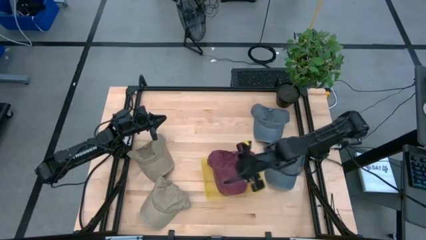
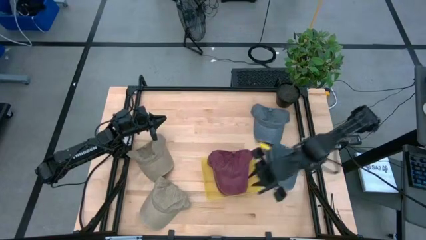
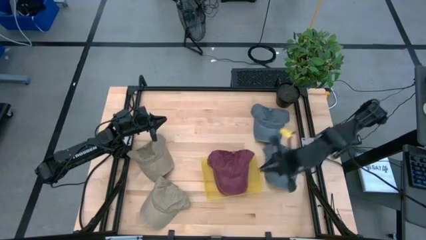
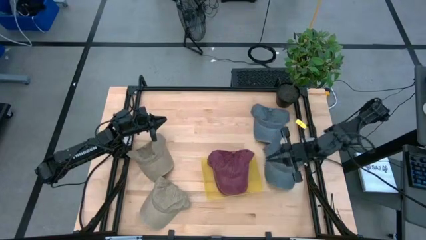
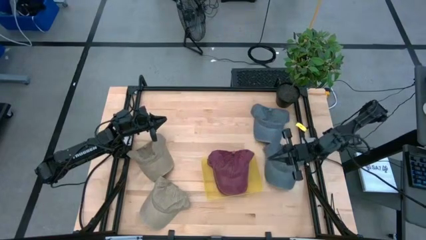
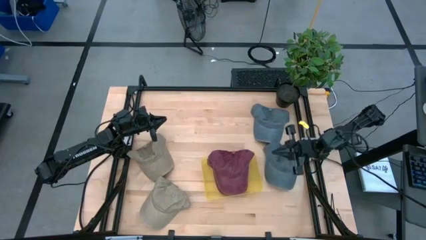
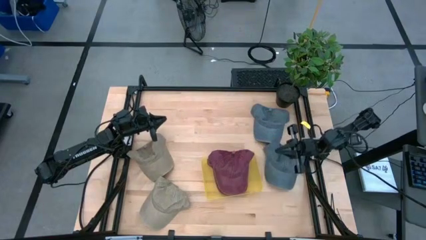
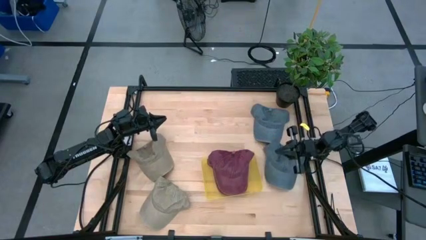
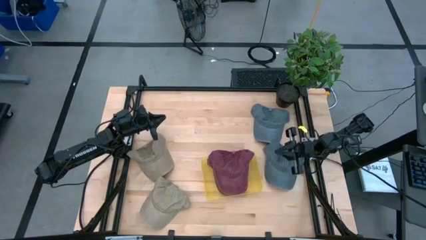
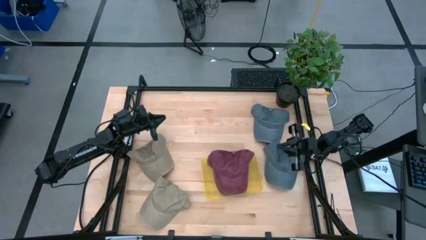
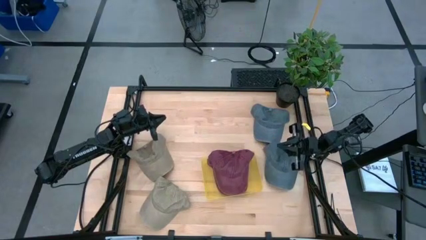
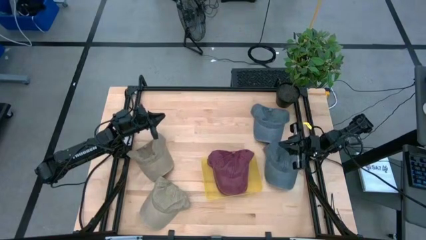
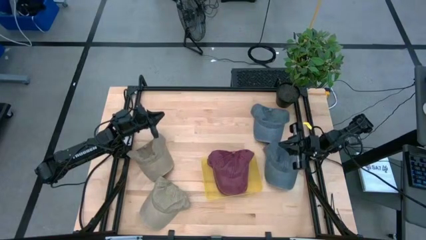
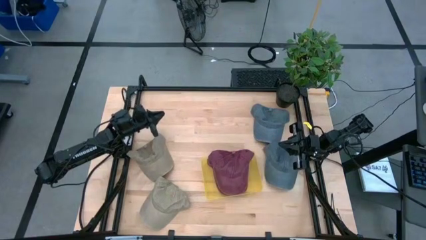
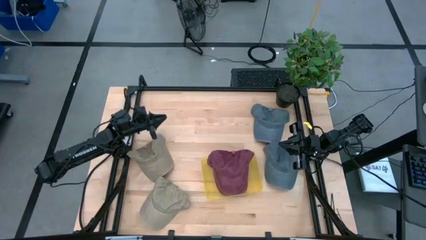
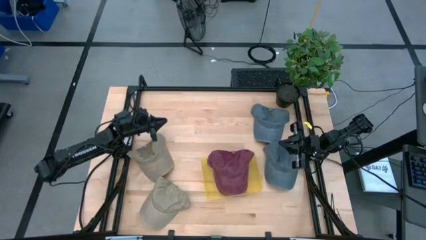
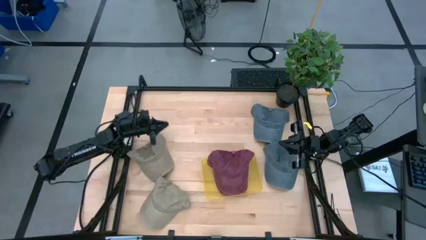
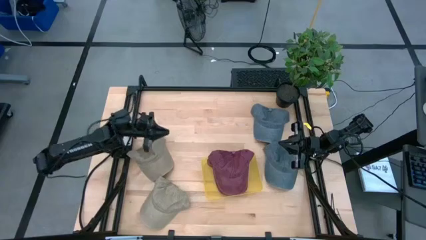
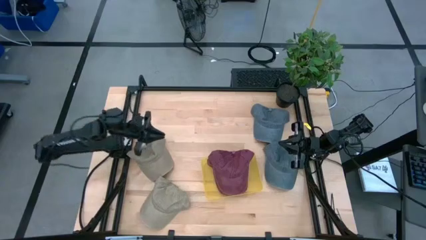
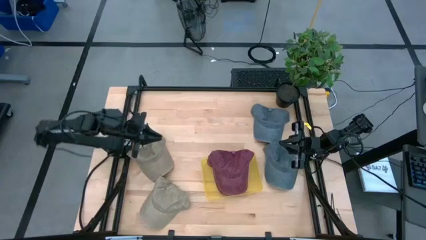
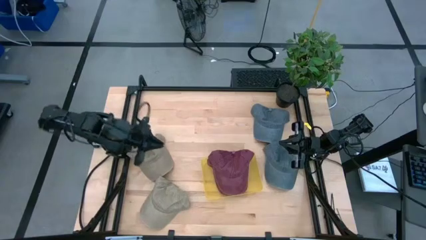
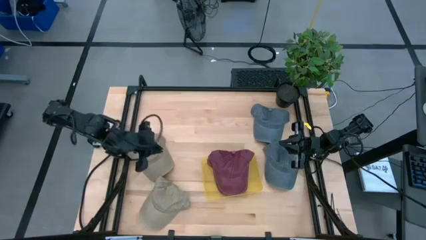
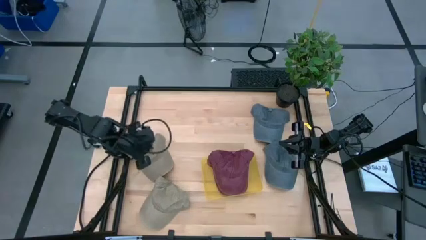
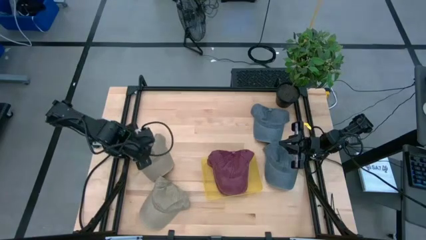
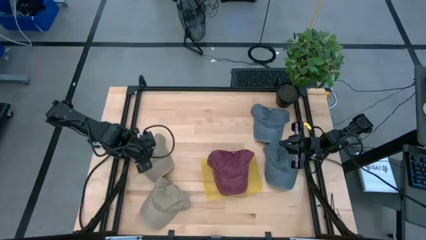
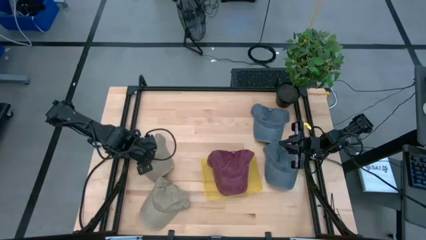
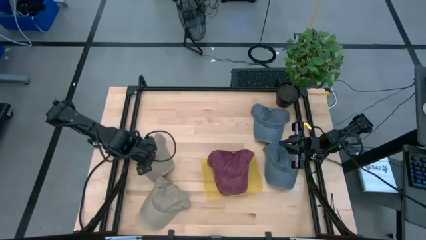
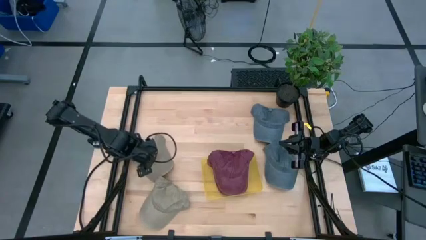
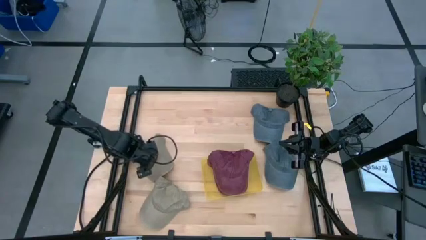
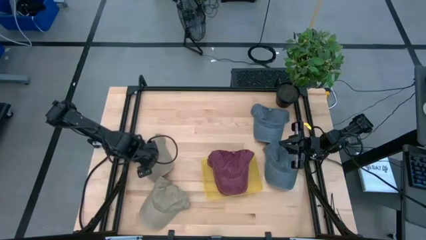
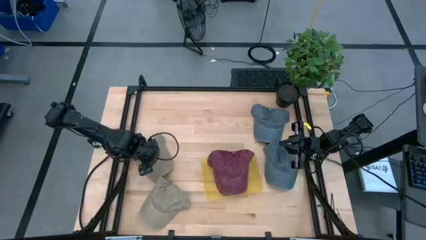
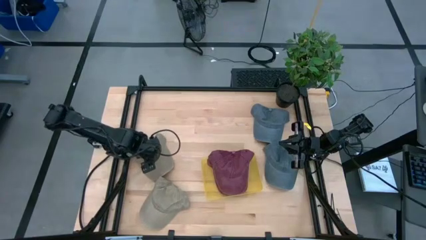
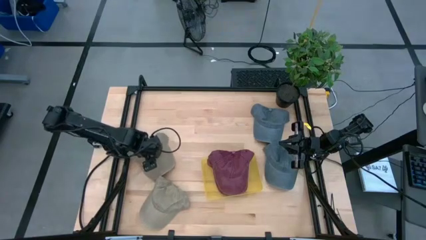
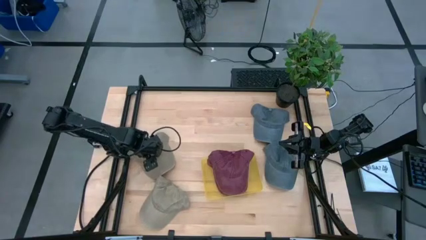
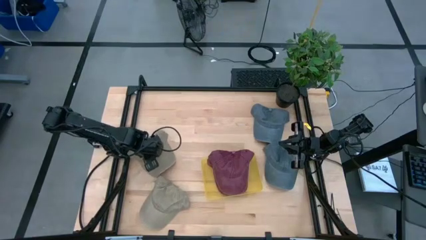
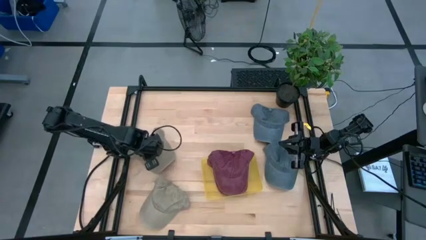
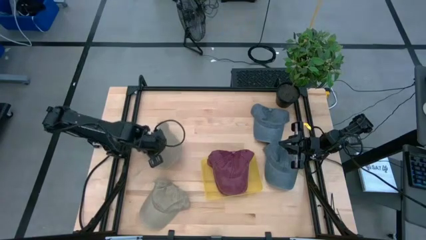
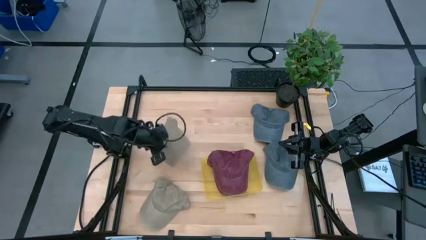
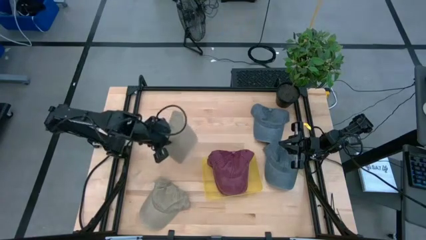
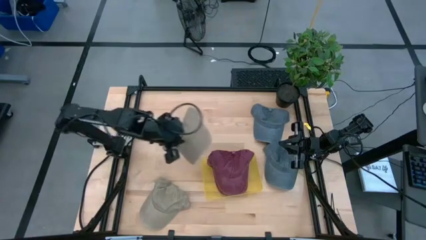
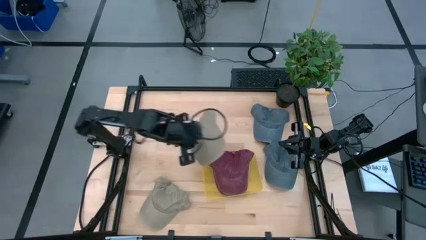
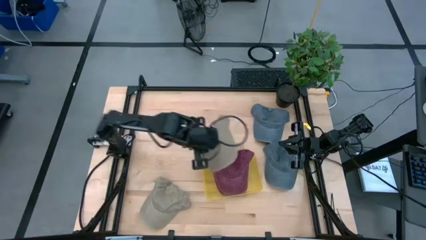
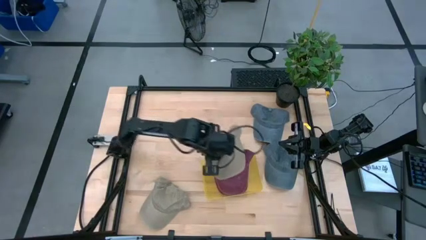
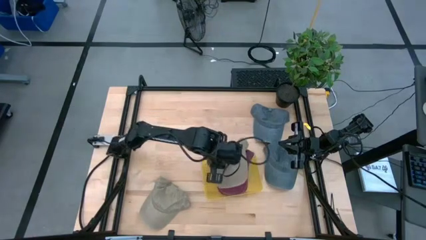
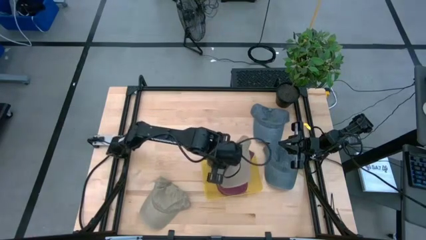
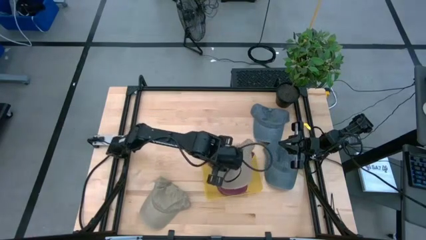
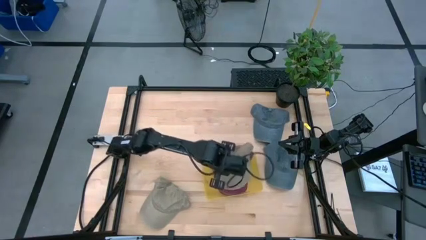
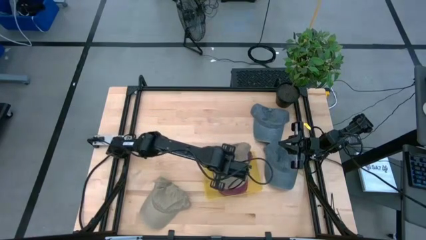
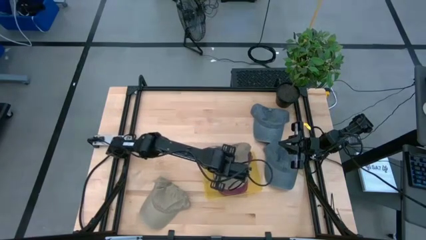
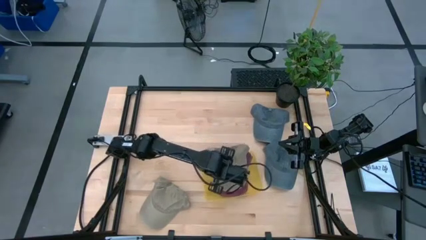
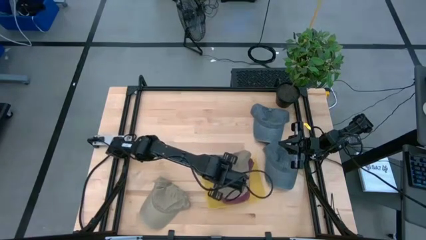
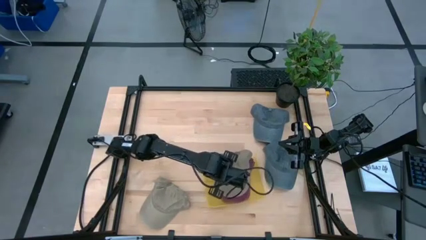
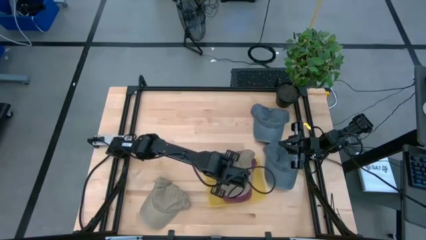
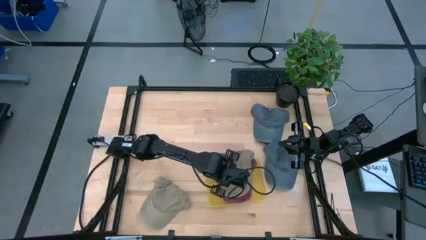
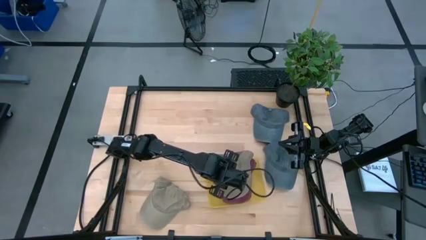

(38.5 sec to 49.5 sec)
Task: Pick and place caps into container
Put the top brown cap into the yellow container

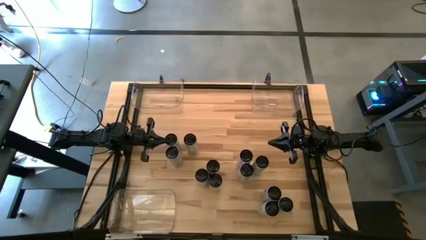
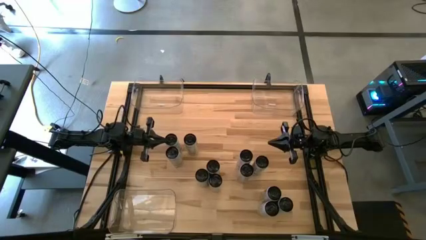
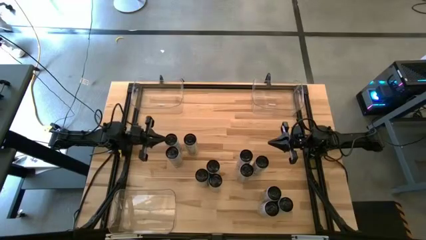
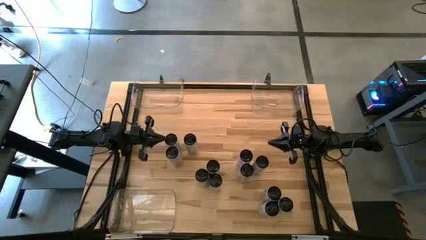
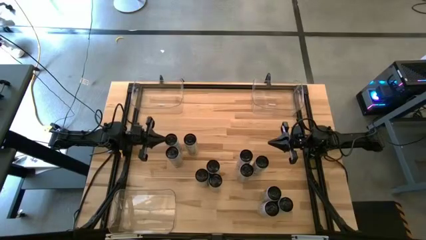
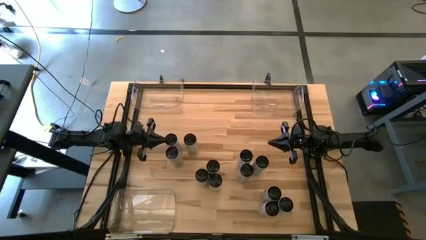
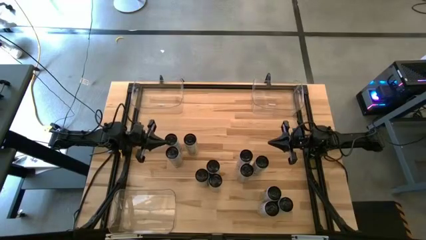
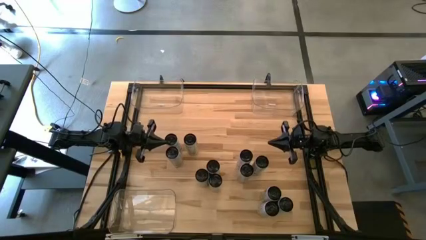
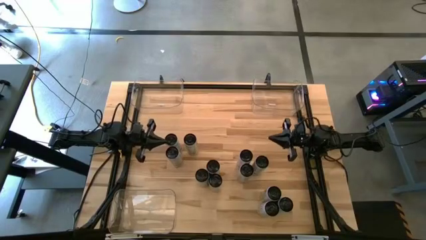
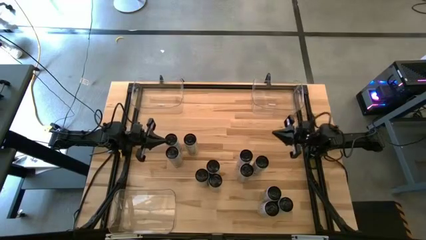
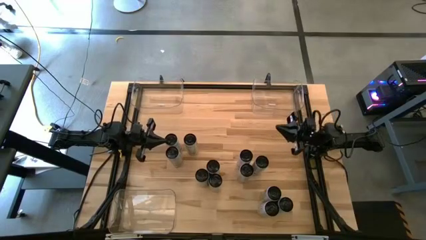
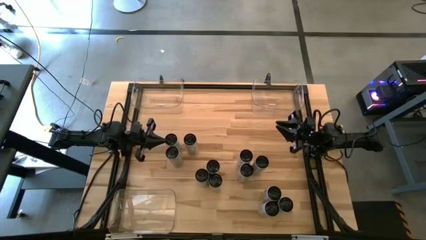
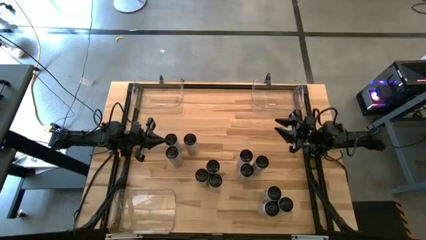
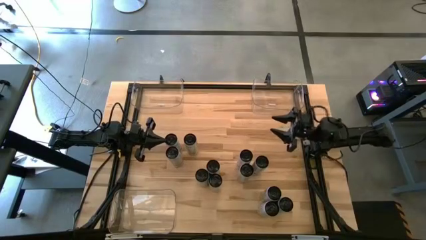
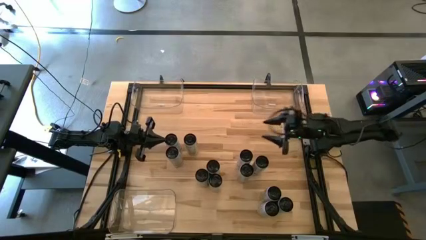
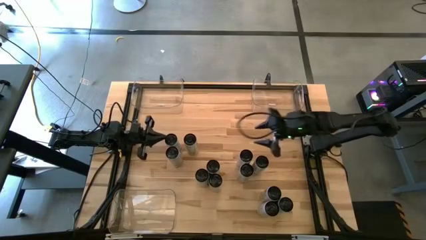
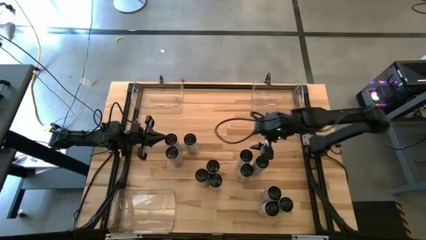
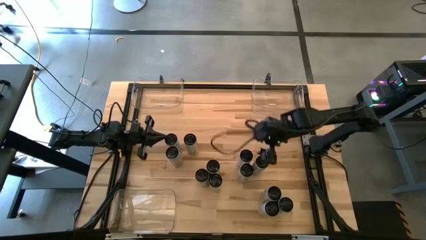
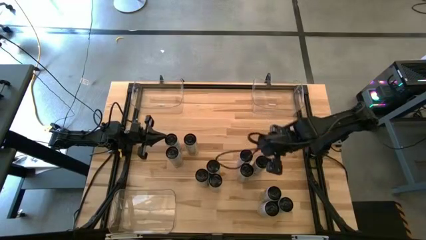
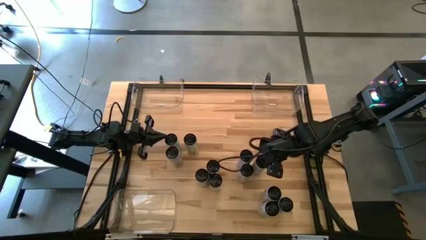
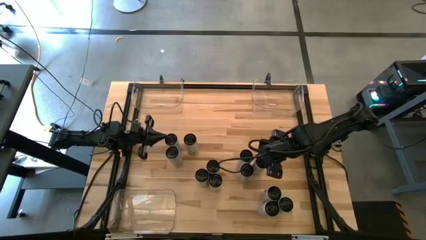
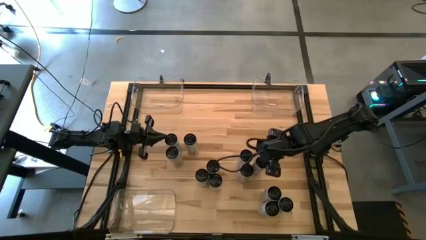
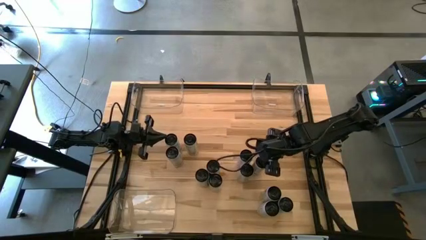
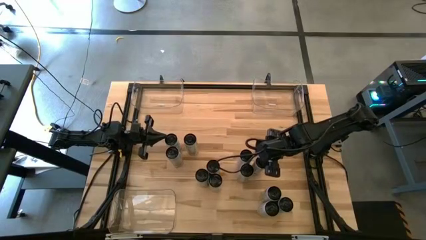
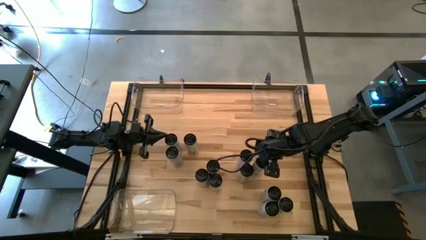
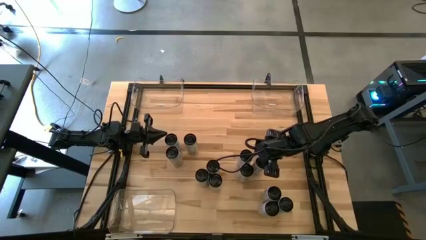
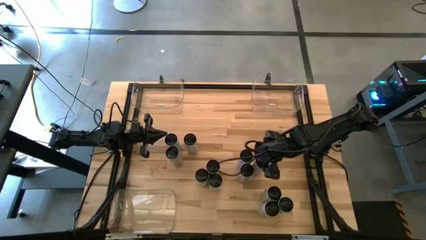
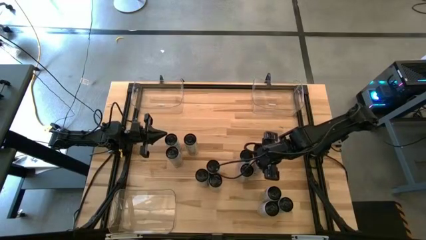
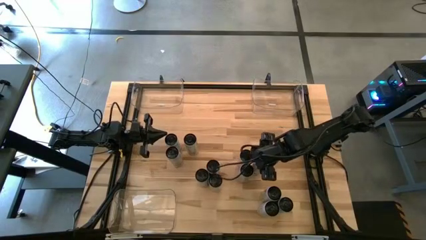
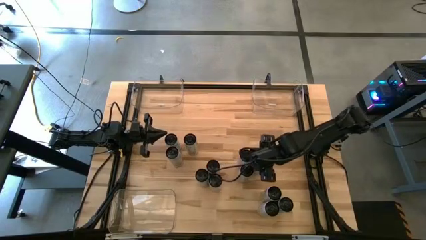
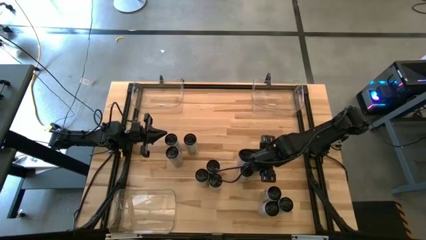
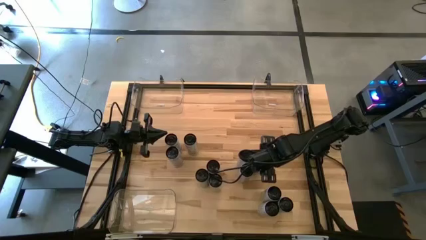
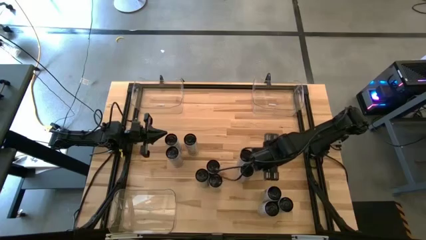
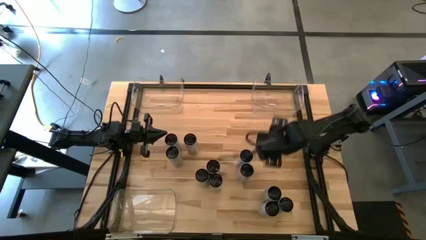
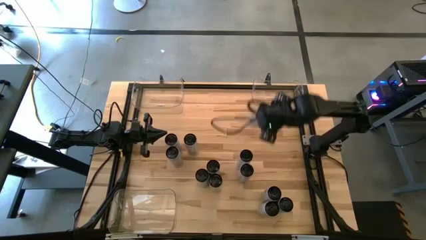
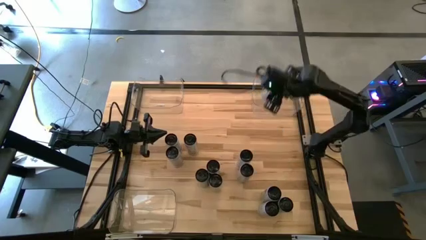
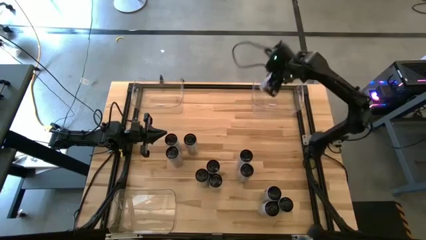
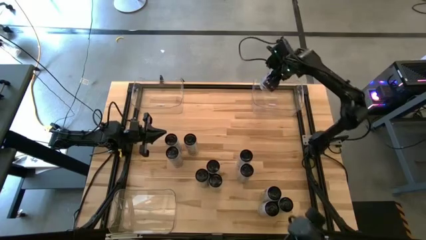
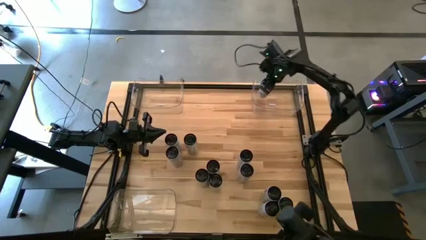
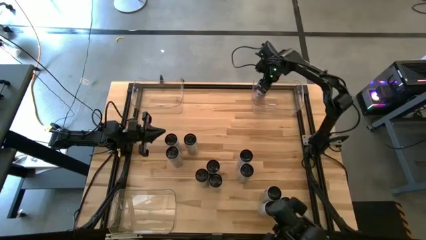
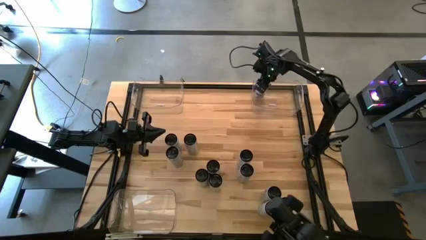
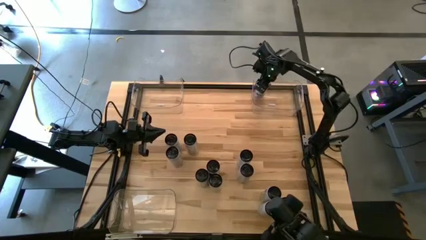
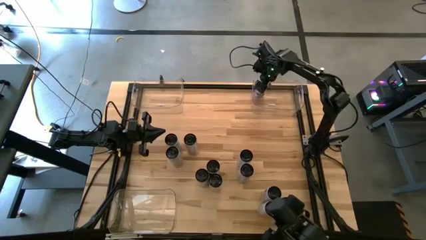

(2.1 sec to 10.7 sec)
Task: Sort soda cans
Put the white-blue soda can into the top right transparent bin
